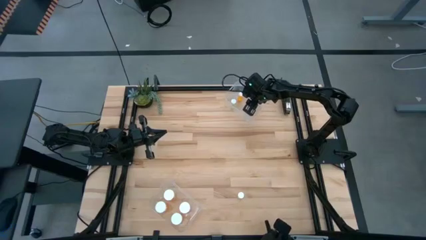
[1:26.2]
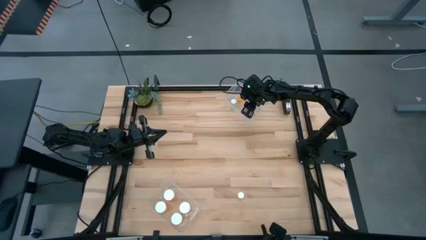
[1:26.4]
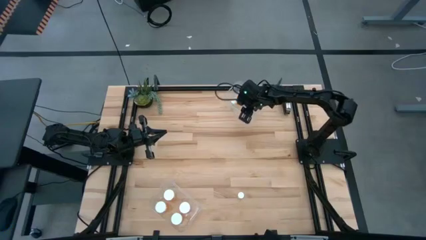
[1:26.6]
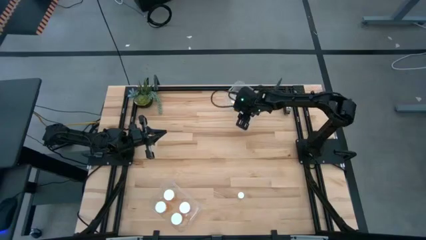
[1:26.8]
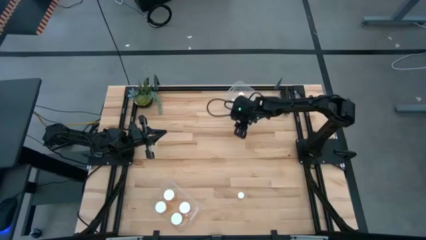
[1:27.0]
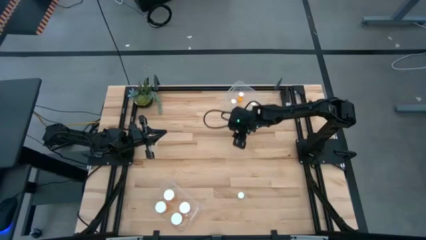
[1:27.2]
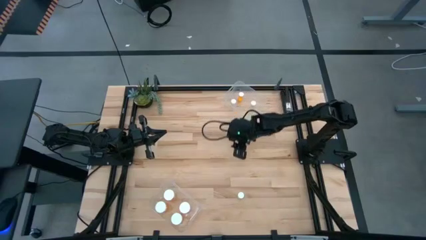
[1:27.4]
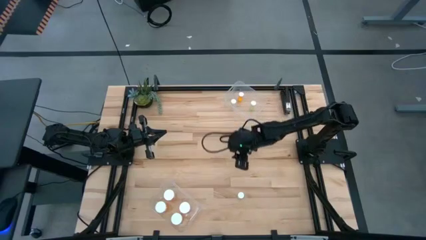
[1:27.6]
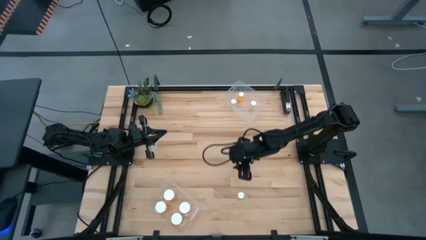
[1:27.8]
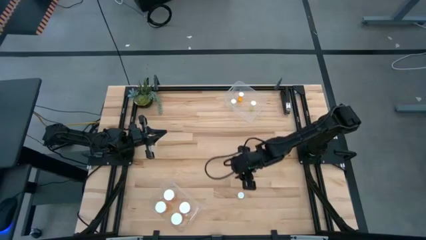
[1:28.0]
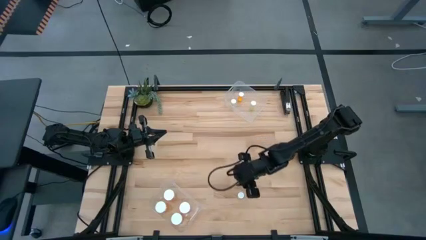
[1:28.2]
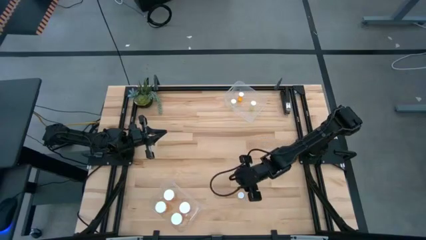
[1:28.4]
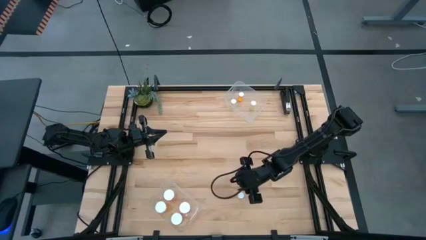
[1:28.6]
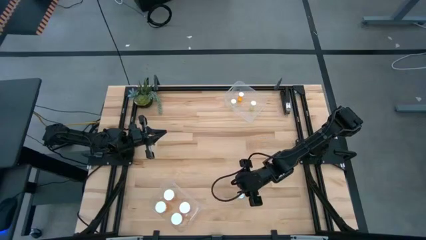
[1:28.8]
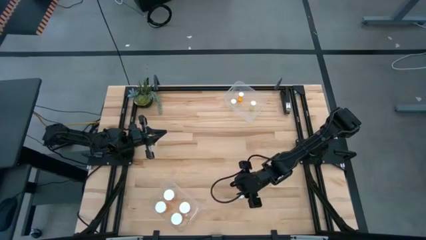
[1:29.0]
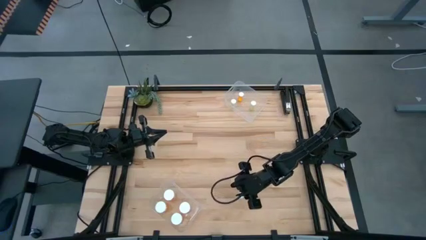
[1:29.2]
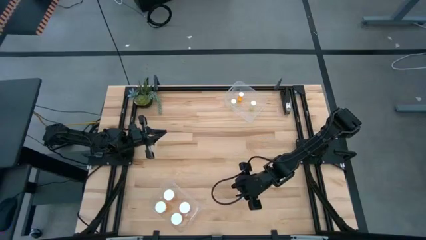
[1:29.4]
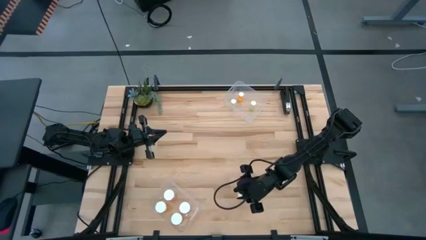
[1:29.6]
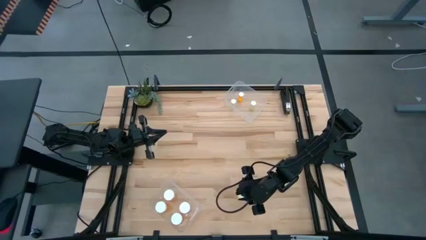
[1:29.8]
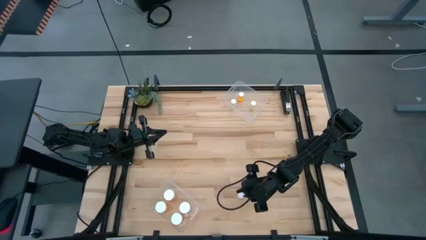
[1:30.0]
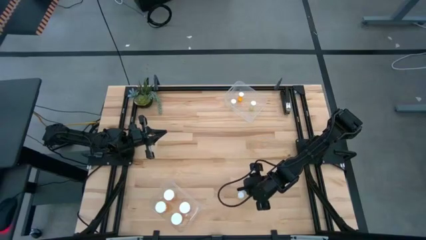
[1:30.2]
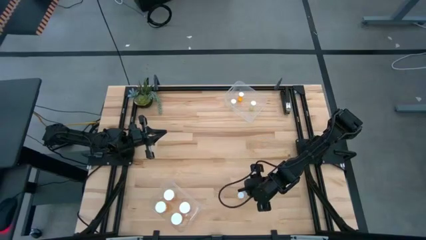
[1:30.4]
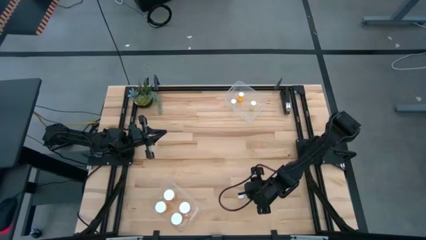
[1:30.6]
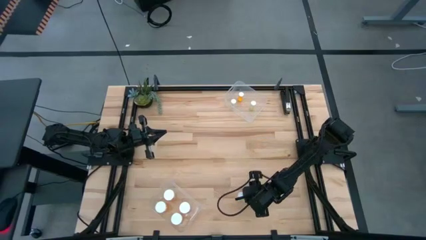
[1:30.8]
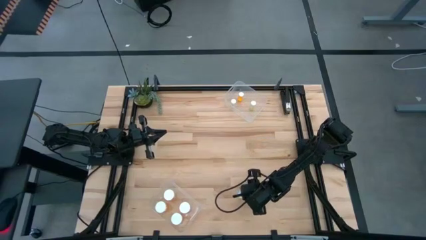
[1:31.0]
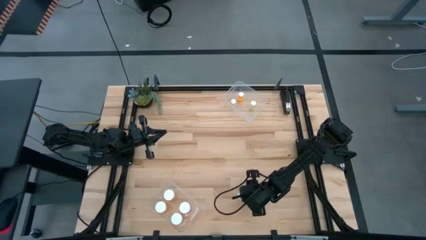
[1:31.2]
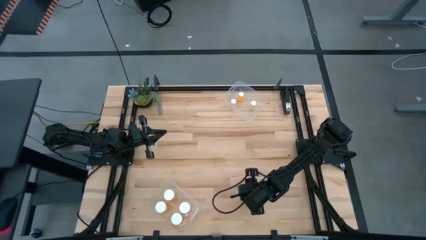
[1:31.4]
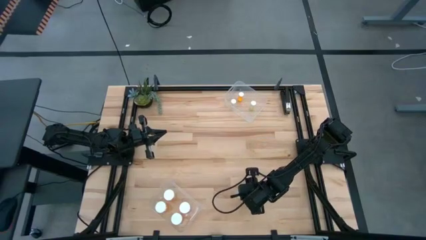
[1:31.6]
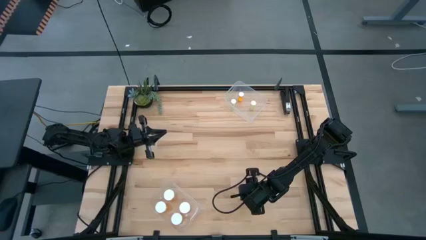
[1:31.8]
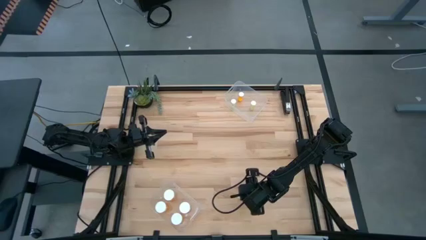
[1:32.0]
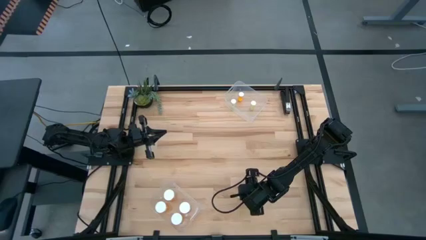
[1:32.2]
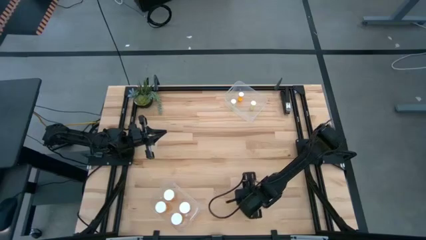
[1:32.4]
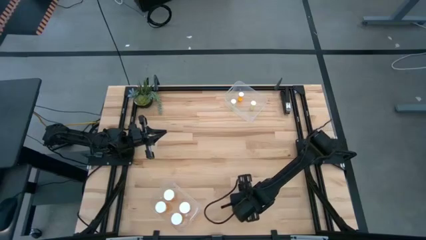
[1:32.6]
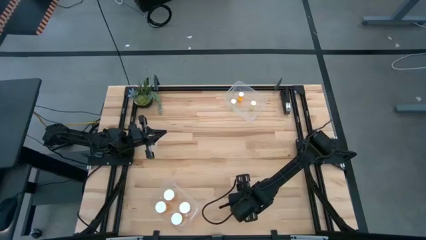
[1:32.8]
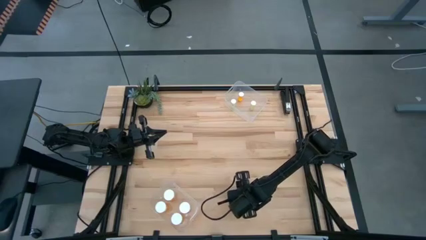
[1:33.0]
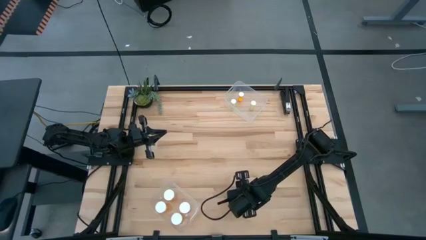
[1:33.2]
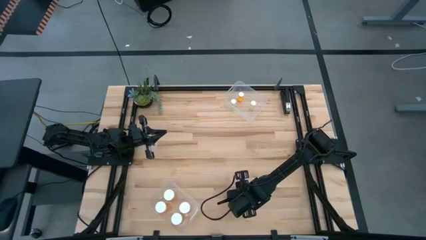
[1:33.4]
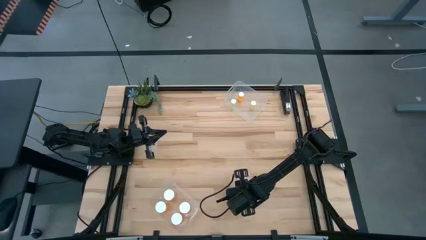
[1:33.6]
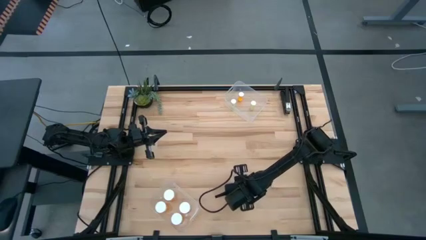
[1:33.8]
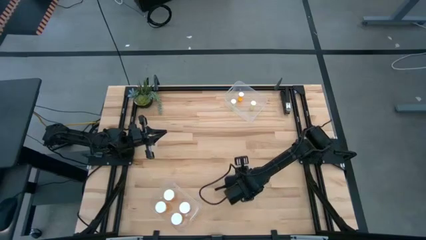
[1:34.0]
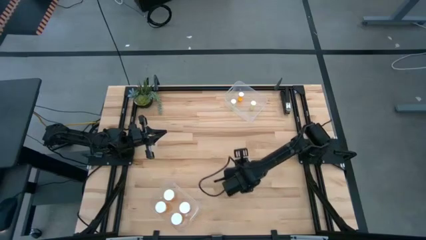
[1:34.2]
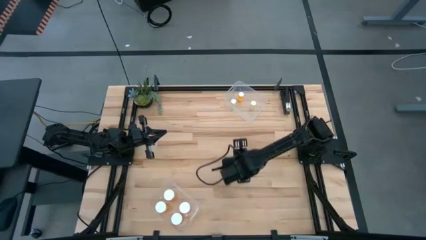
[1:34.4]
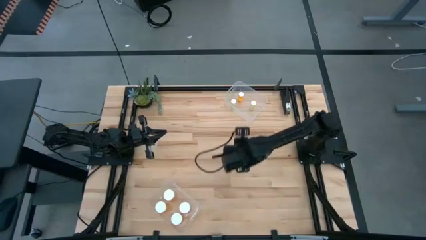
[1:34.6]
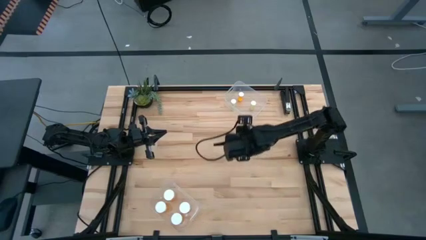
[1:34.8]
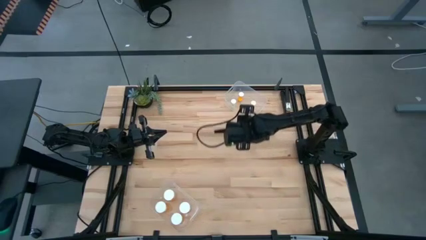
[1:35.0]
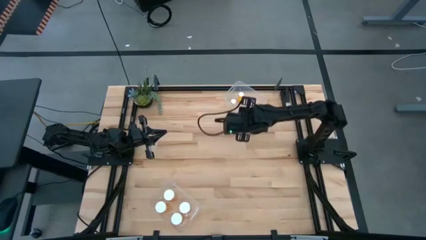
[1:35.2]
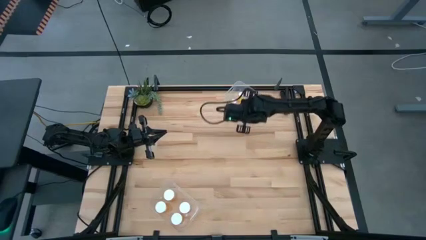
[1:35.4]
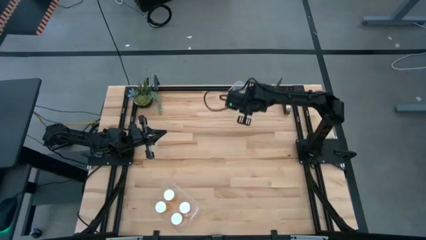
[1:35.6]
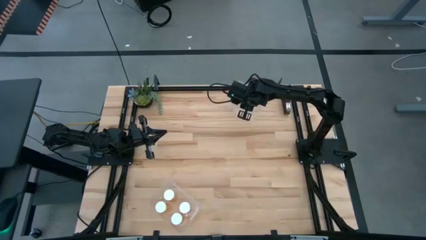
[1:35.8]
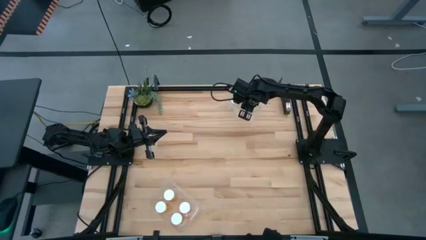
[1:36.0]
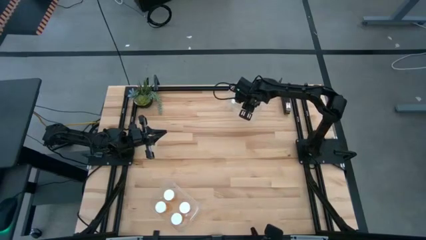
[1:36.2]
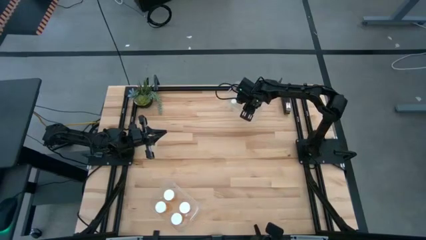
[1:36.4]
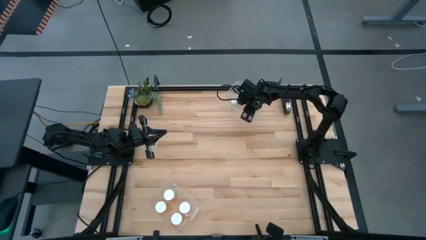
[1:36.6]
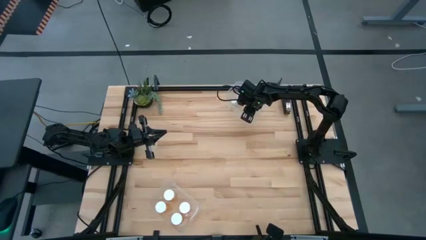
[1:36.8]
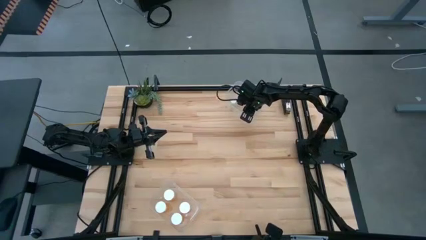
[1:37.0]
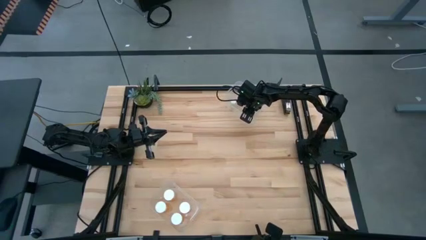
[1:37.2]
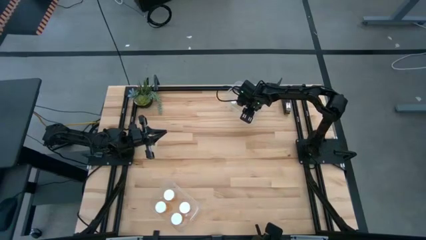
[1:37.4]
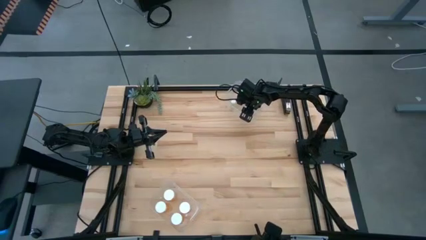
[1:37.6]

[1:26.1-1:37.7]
Task: Pick and place medicine bottles into bin by pill shape (circle, oval)
Put the yellow tablet bottle into the top transparent bin

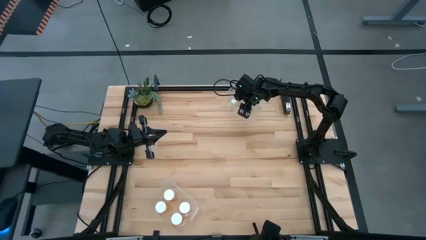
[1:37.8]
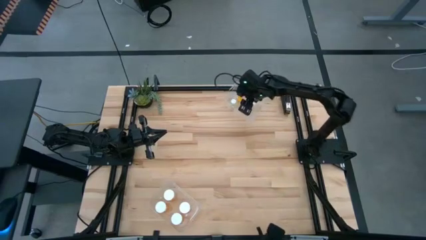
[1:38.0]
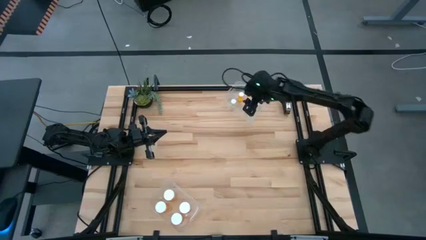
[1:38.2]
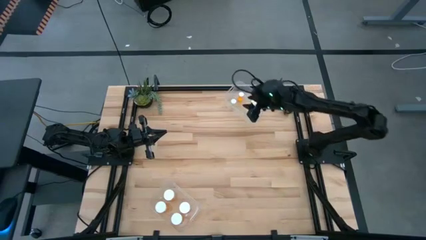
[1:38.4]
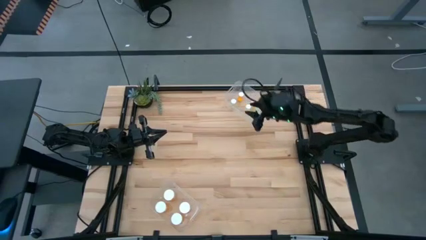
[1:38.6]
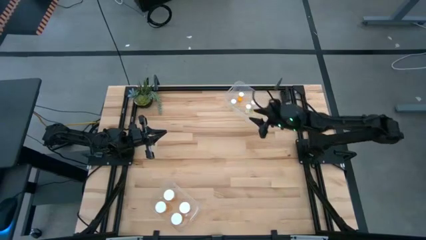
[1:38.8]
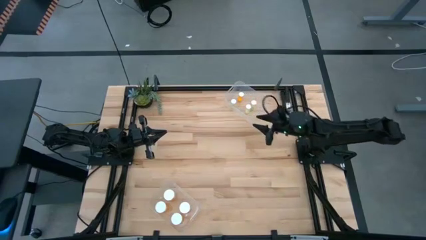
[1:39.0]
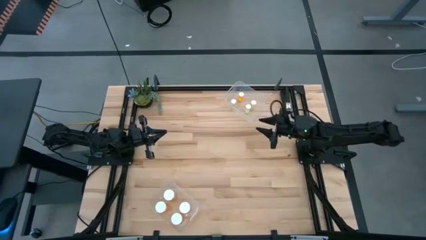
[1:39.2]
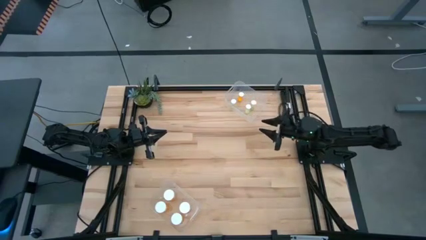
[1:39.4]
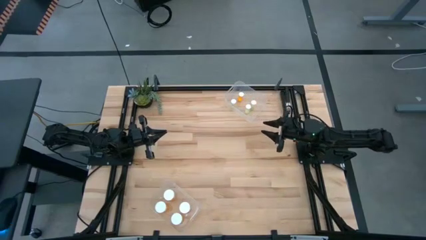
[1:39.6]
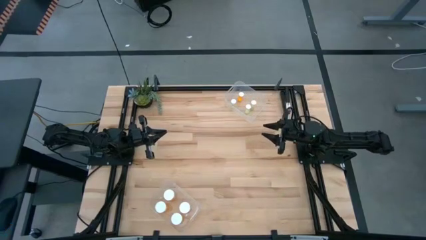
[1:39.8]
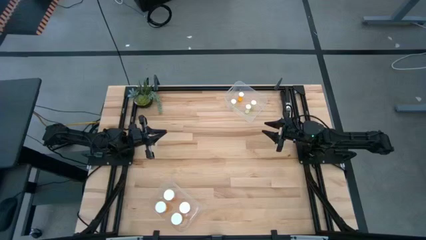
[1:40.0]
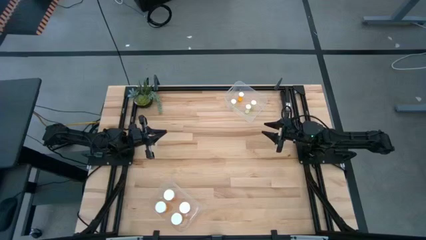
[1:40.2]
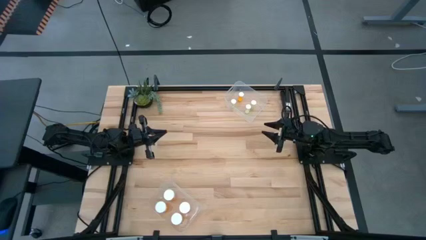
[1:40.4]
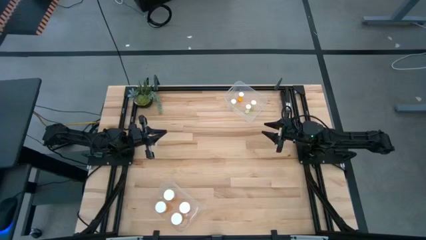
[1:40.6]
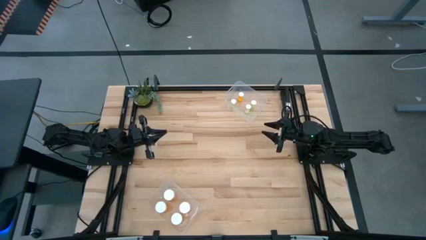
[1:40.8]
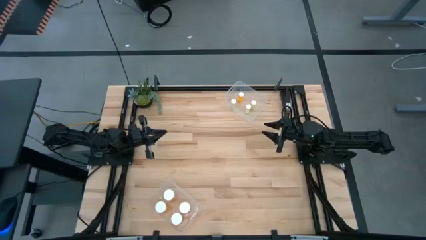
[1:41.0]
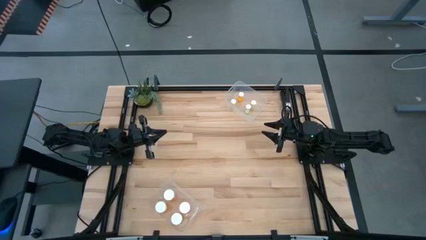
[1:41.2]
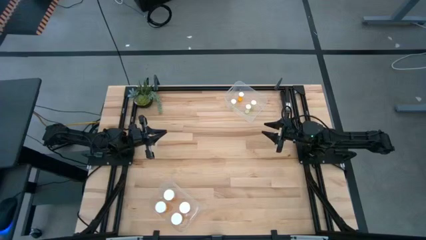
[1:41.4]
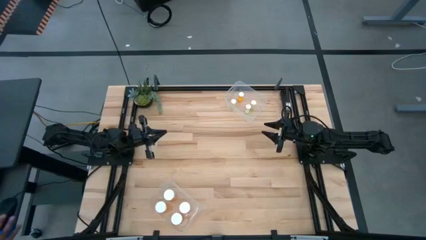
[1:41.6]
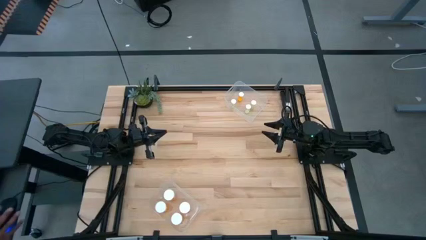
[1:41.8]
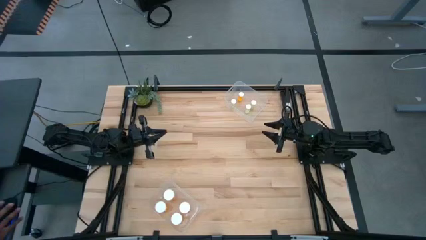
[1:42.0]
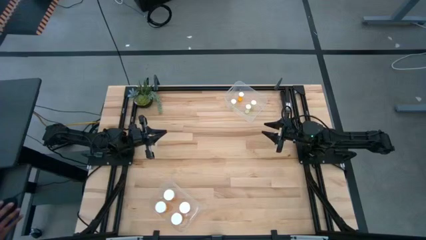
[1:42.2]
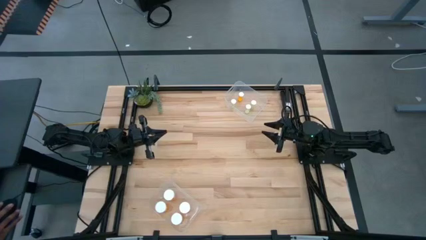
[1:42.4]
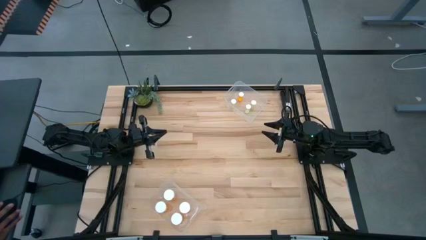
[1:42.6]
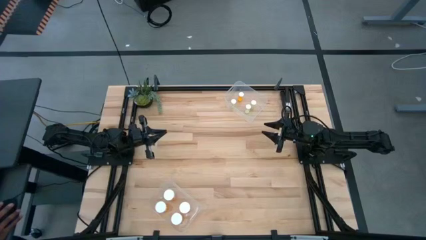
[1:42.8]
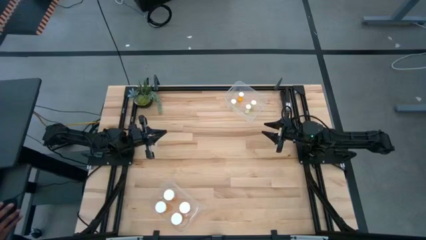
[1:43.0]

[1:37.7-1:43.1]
Return to Home Position
